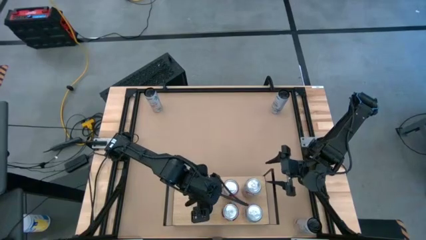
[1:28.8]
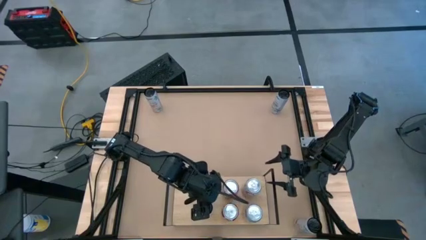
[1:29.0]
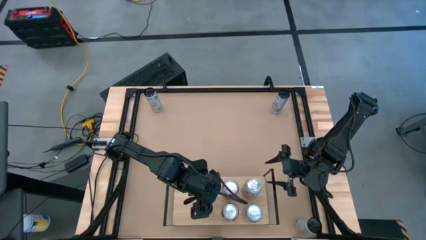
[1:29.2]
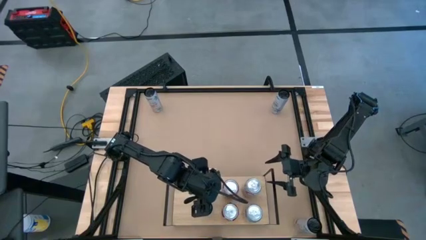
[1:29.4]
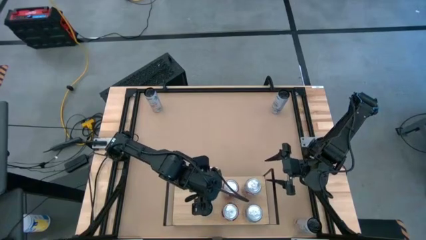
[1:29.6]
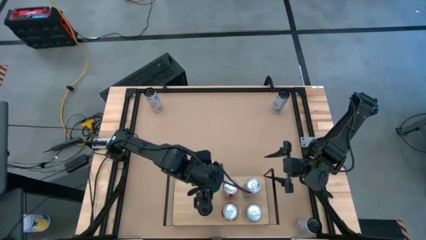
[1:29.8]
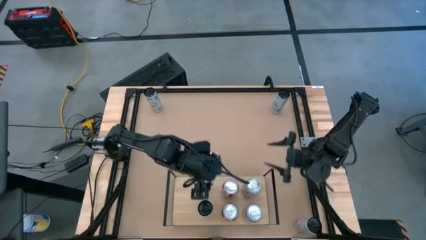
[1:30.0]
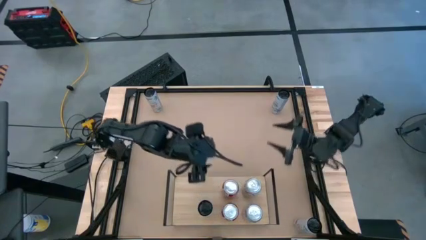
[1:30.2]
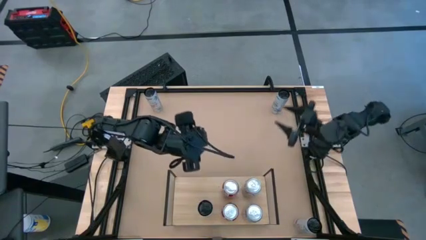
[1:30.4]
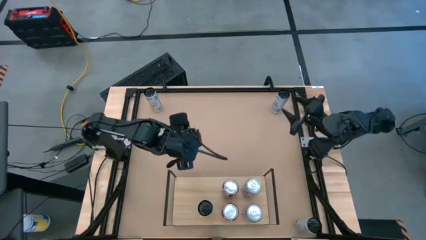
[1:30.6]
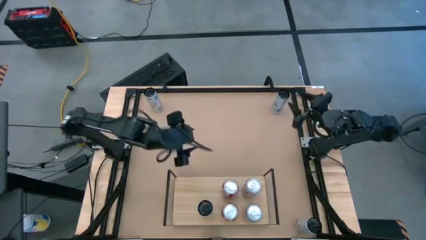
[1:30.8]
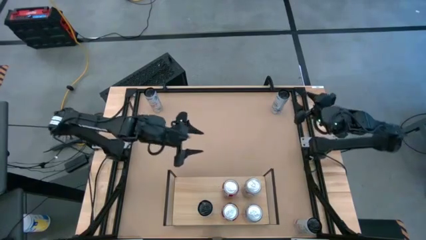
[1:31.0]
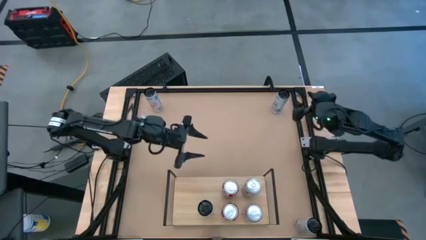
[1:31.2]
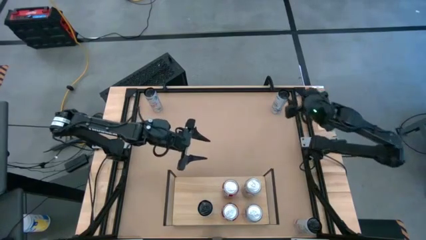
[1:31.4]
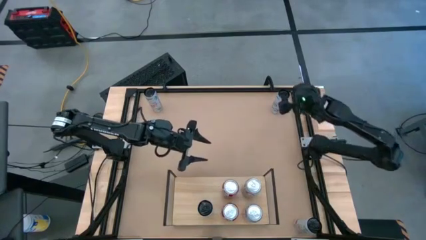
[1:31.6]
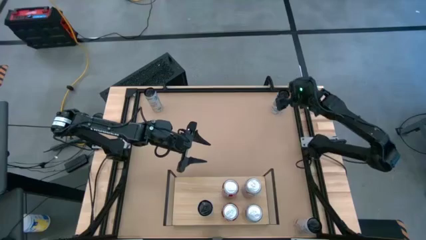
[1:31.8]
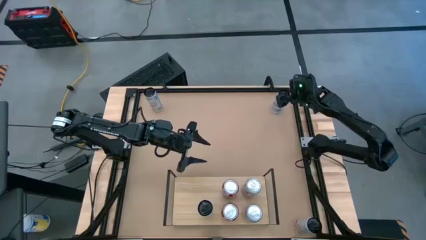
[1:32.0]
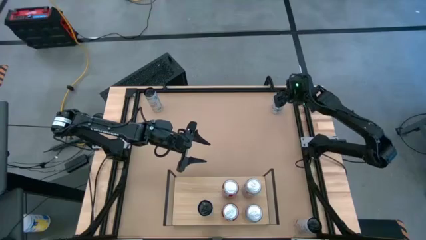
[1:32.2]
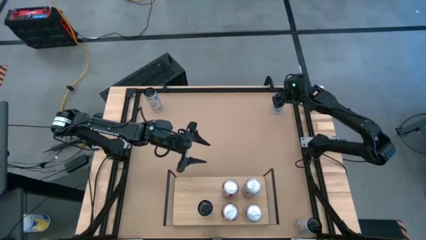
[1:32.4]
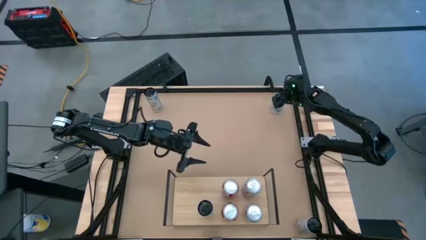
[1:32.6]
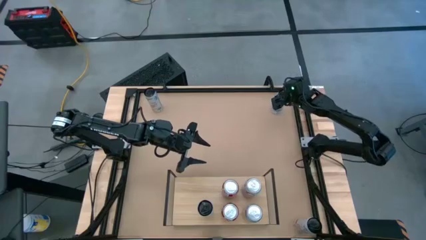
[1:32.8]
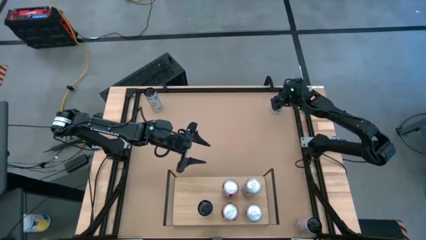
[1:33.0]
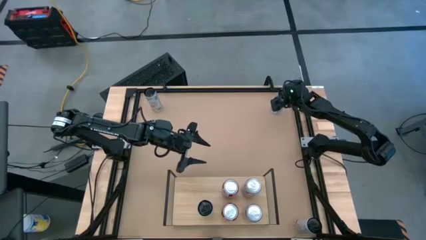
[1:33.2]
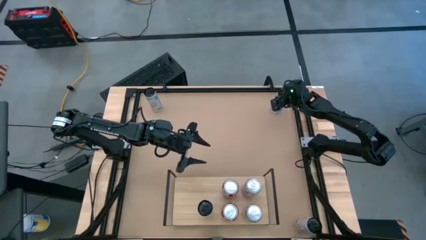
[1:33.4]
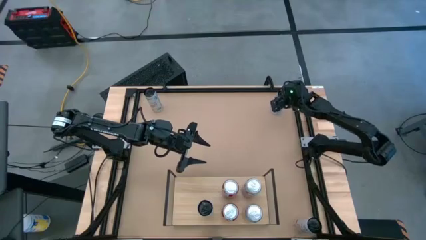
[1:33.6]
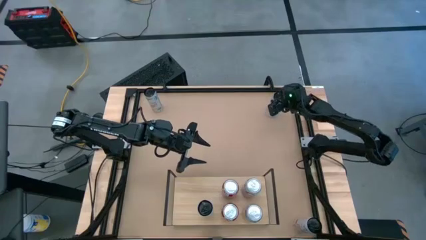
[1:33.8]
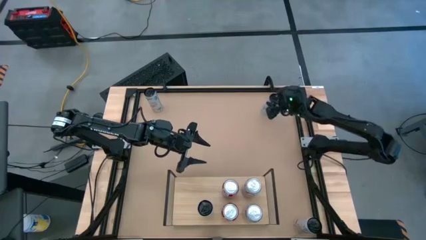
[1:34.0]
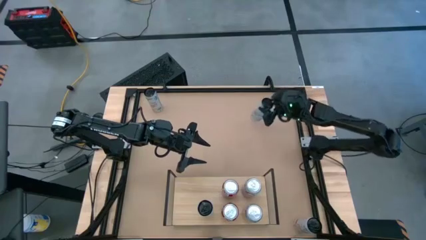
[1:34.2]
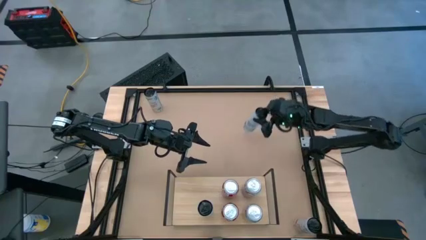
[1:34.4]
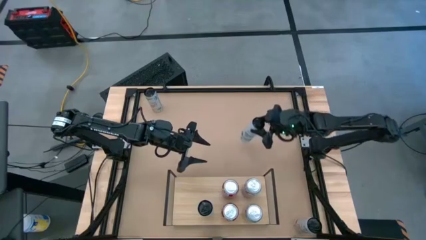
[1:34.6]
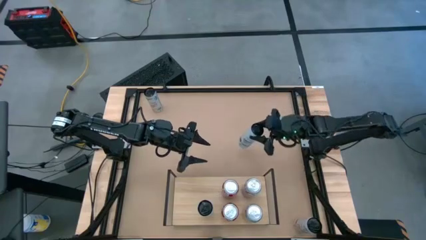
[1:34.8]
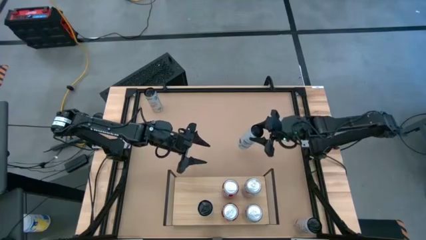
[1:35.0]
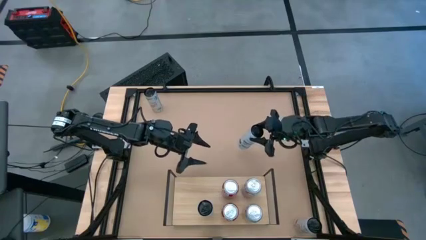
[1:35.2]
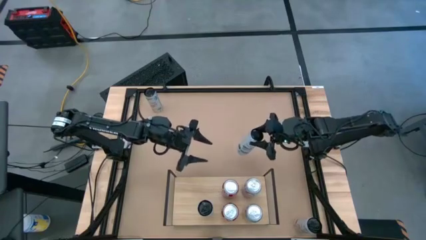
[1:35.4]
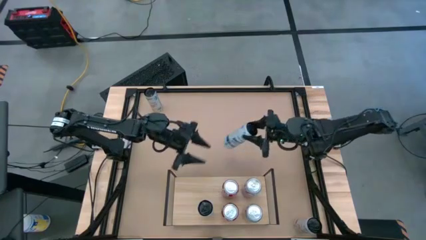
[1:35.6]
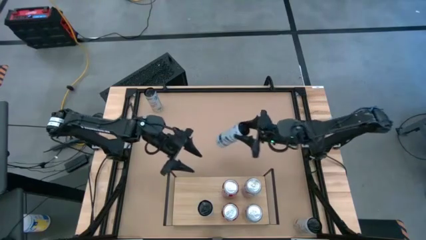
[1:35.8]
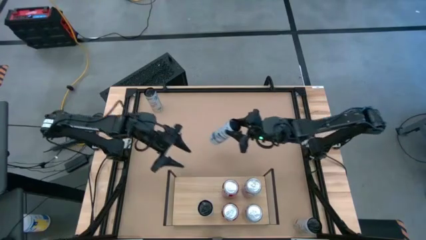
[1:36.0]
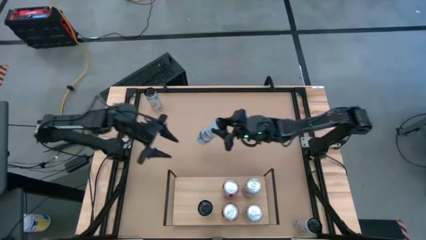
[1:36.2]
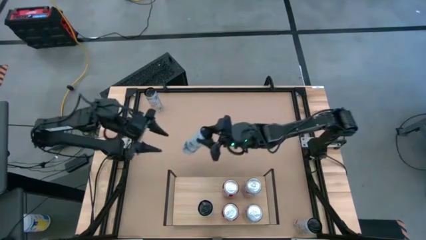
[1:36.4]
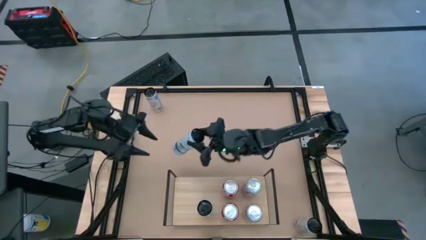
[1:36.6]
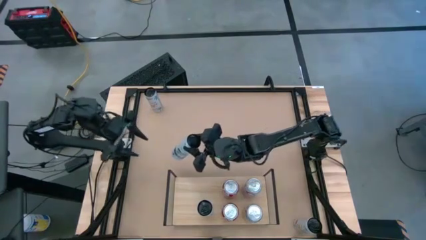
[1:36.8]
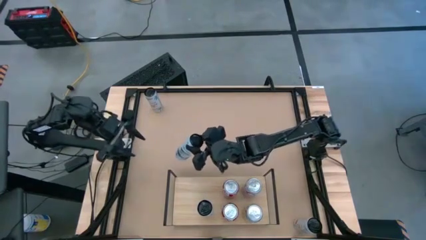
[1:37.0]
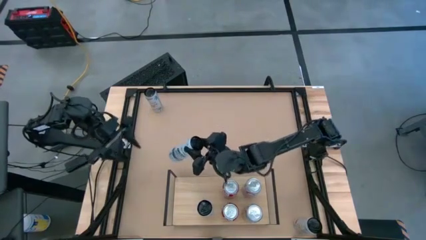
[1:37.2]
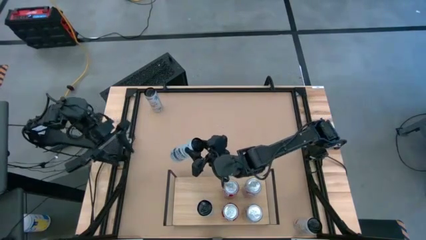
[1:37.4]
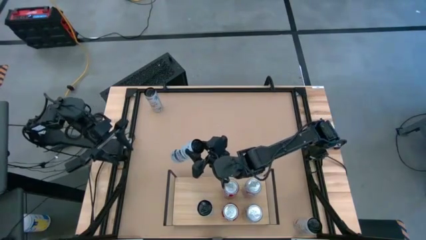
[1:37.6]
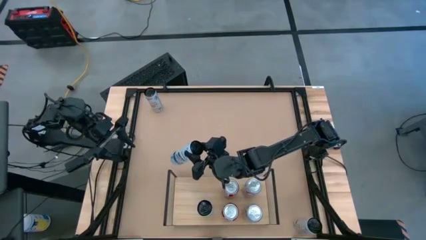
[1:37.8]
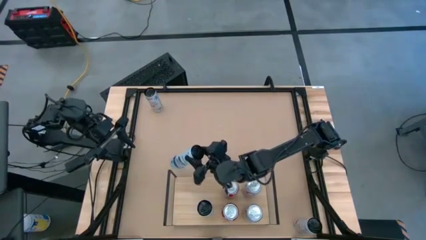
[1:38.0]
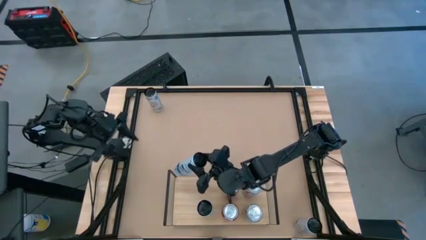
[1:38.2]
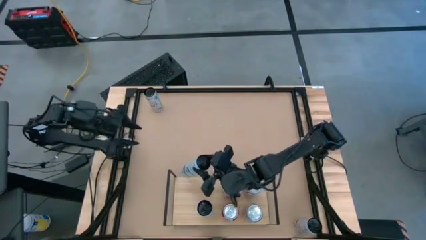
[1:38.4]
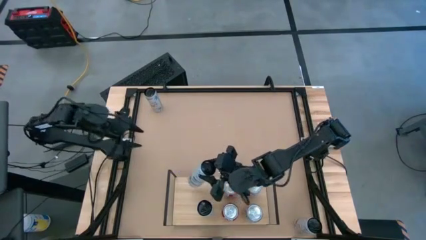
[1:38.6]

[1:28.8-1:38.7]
Task: Place canned beverage on shelf
Put the white blue soda can aligned with the other white blue soda can on the shelf
